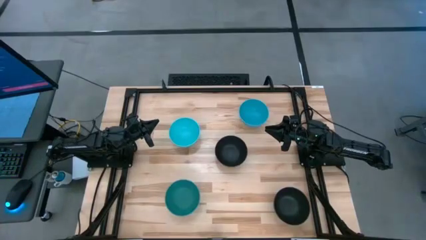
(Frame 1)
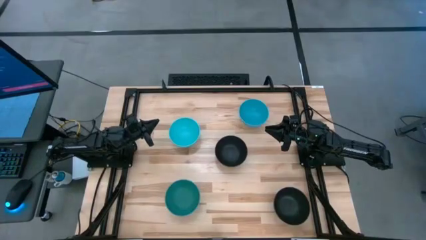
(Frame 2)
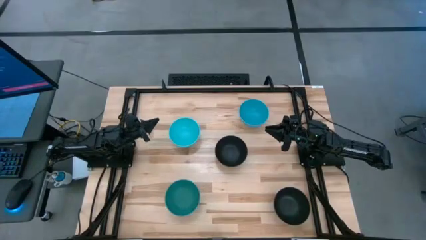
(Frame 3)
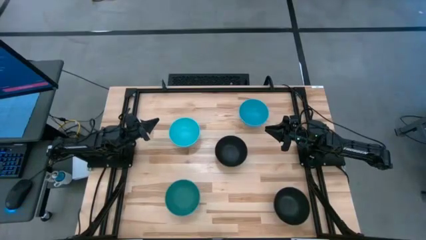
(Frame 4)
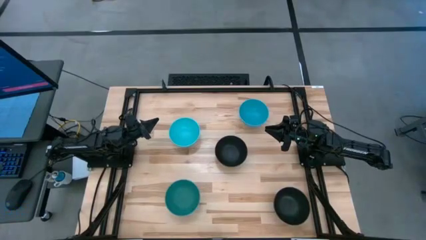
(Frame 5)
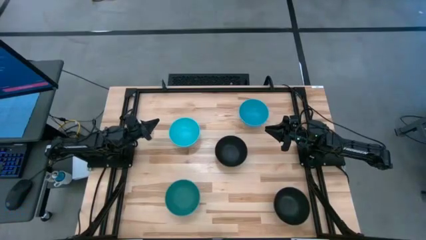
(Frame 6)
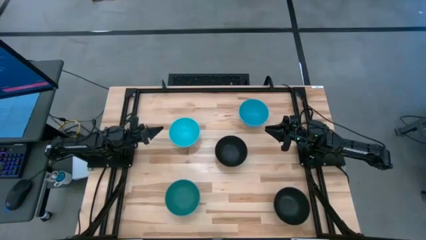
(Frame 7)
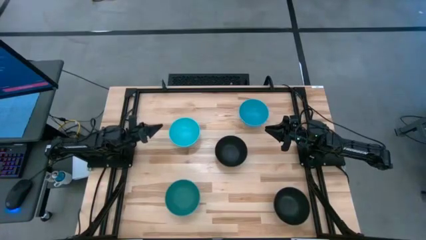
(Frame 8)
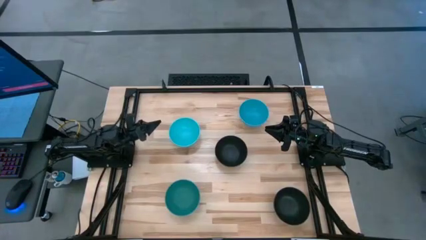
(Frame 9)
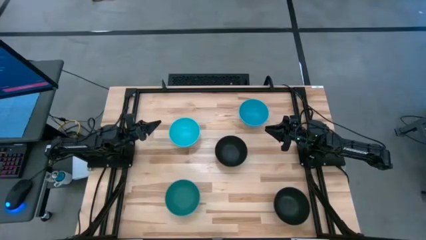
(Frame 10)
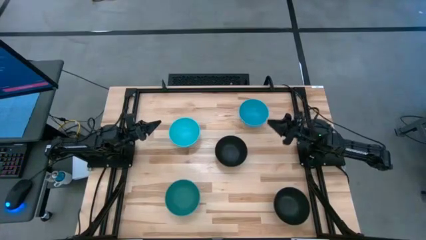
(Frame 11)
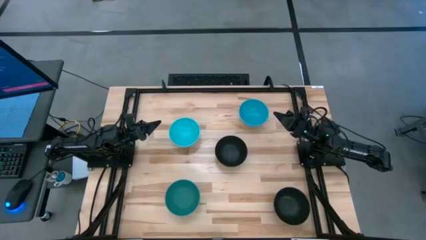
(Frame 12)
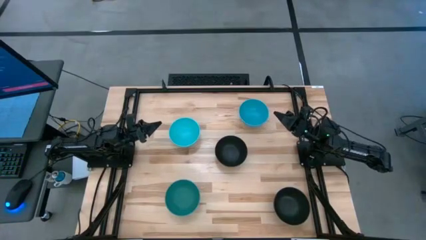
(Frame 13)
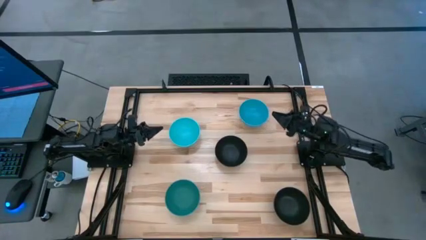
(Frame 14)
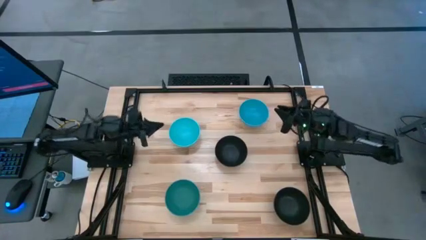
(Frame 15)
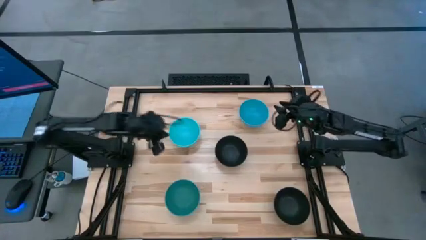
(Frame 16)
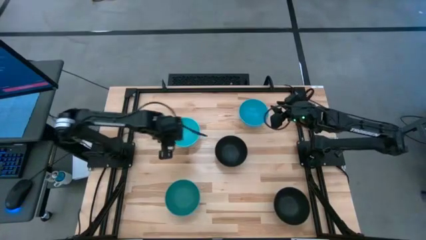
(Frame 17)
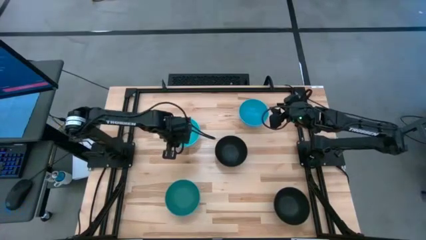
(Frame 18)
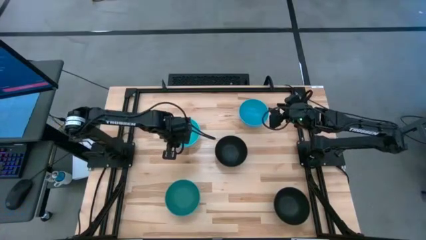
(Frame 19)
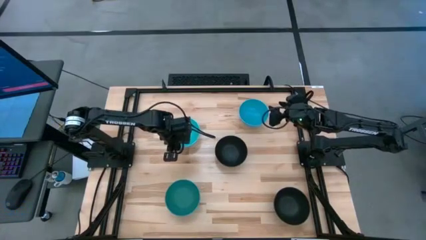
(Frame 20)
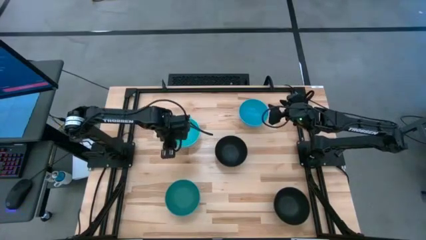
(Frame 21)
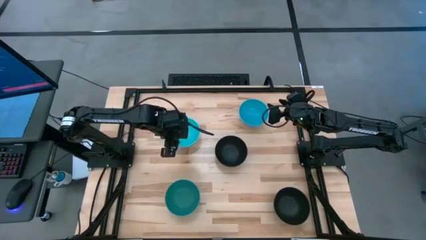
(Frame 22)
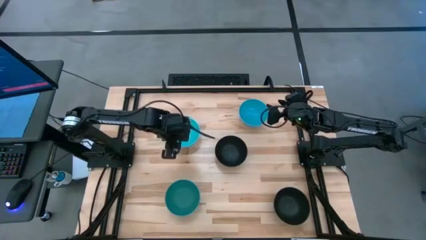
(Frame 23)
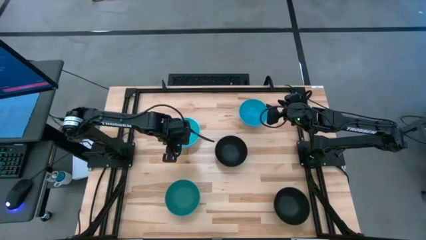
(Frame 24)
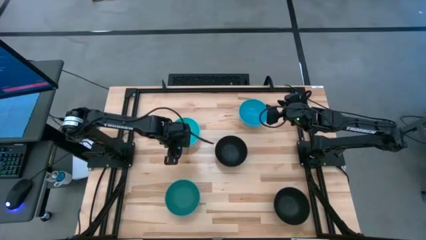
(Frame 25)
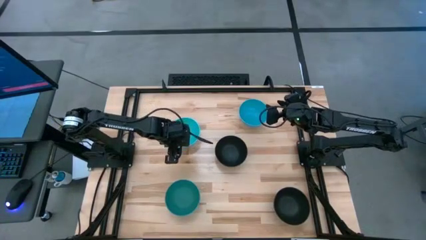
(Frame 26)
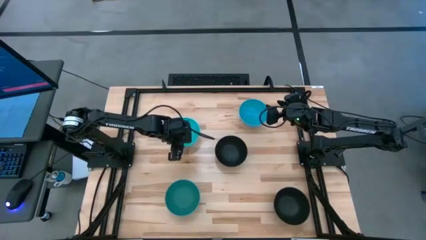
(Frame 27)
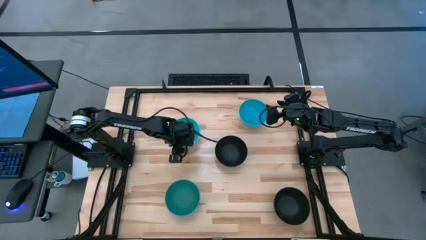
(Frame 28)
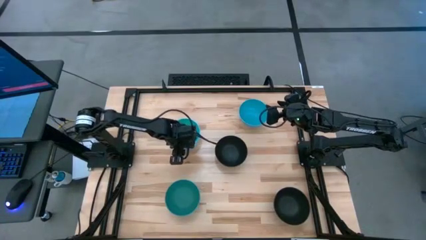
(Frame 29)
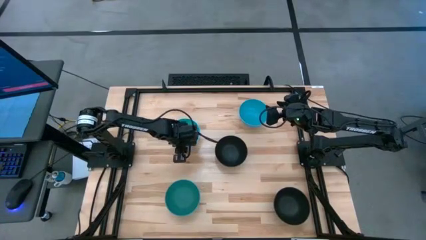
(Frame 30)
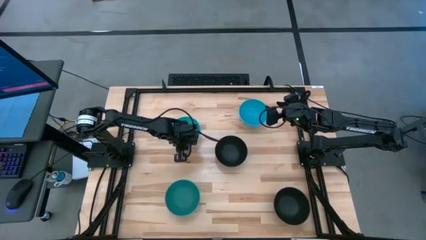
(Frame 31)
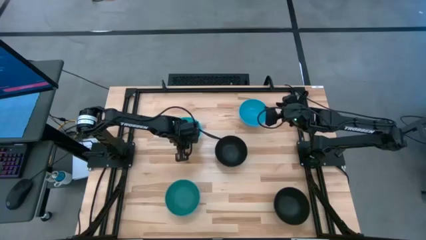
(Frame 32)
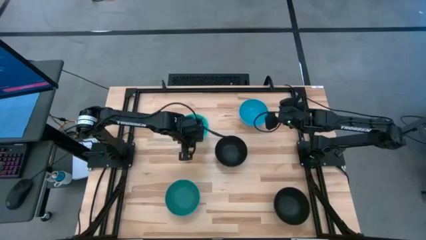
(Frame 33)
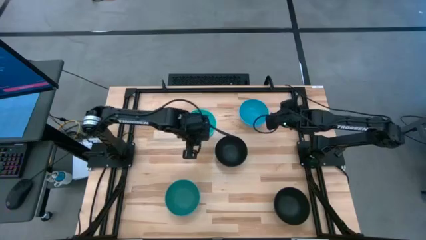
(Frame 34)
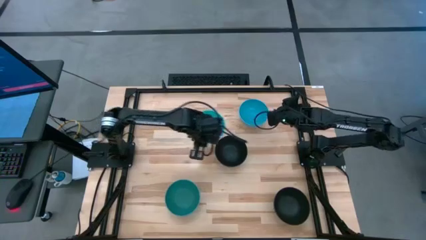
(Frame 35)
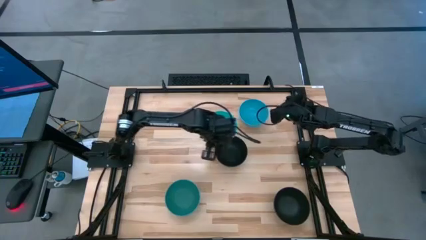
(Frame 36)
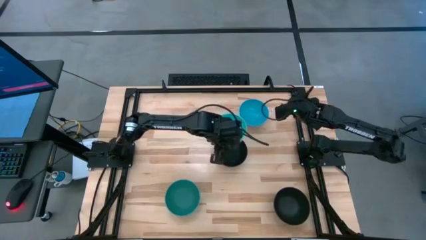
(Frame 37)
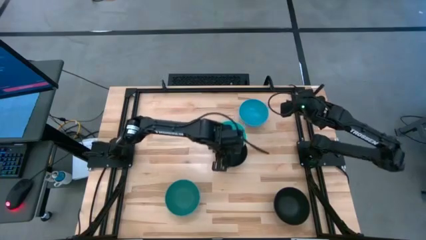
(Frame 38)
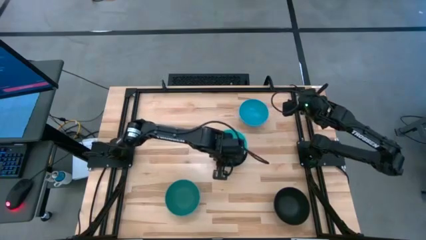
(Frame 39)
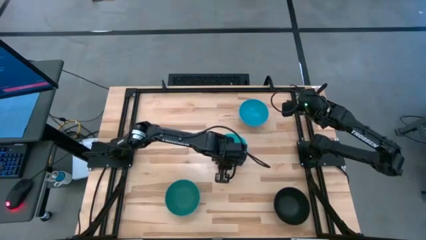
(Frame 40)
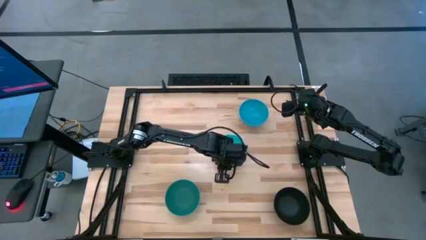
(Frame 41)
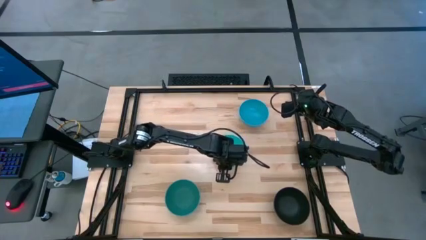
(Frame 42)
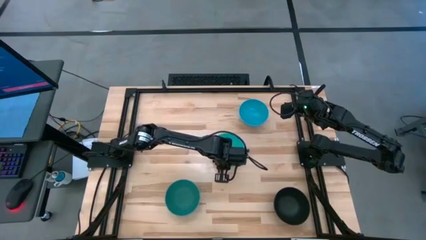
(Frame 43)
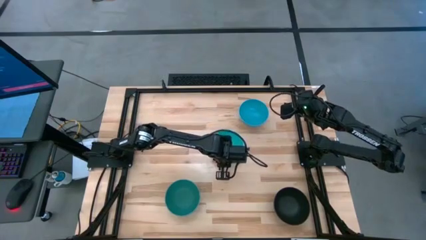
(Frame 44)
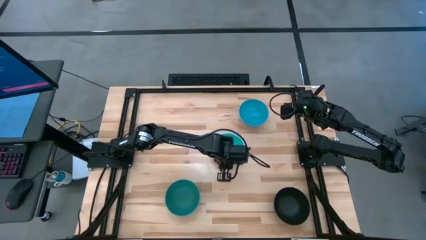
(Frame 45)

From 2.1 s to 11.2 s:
Task: Nest bowls inside each other
Stack the light blue bowl on top of the top black bowl

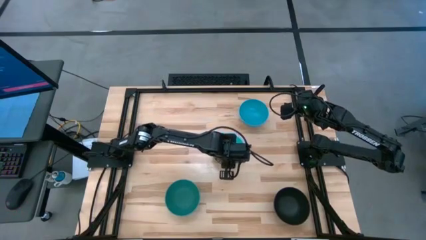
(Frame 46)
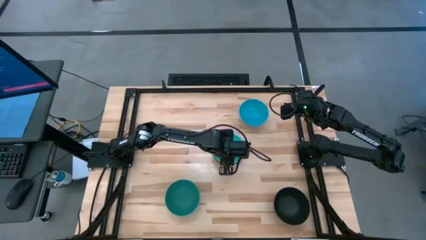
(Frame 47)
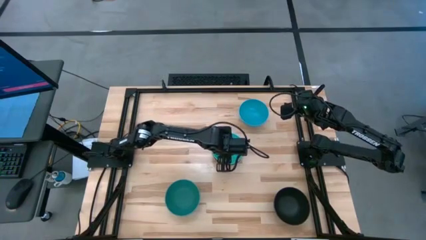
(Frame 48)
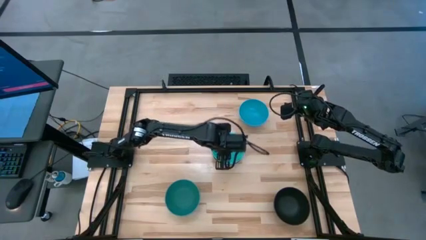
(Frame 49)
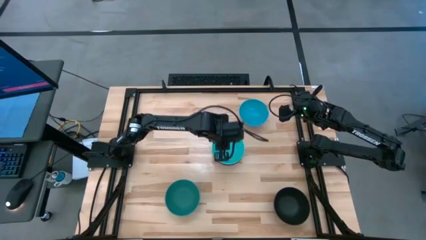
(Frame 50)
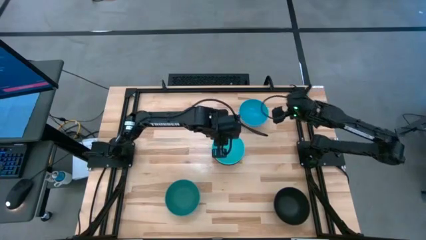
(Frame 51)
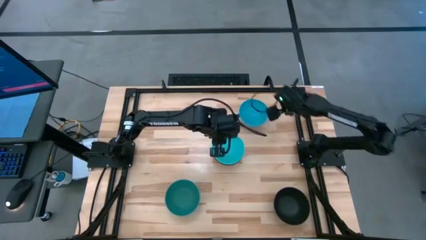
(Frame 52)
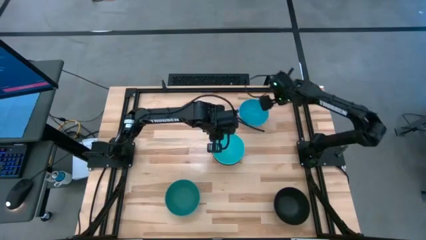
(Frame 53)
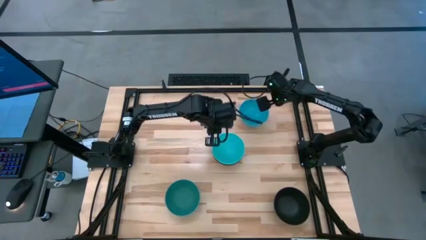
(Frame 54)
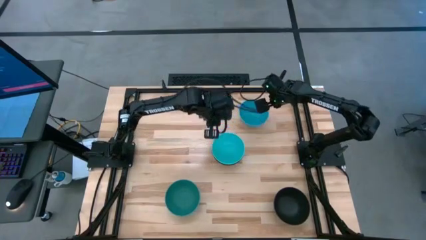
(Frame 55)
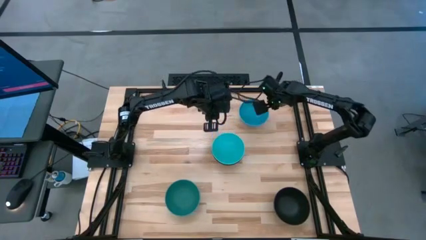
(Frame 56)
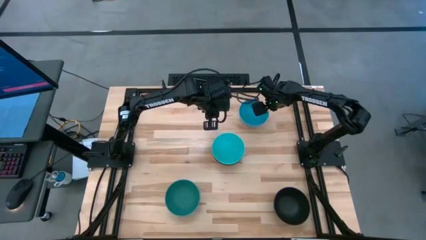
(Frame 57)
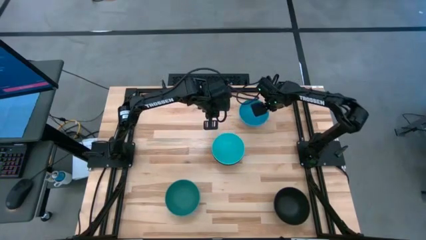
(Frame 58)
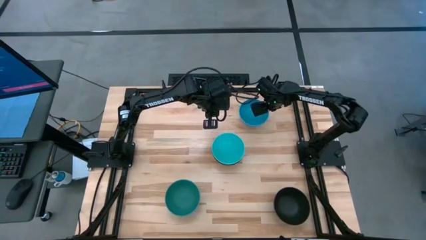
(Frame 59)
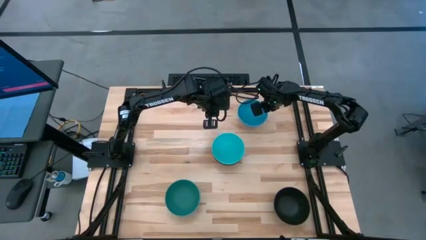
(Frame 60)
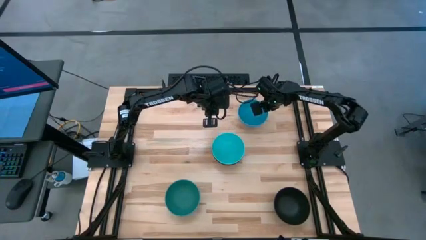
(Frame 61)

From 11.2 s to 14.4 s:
Stack the blue bowl on top of the blue bowl

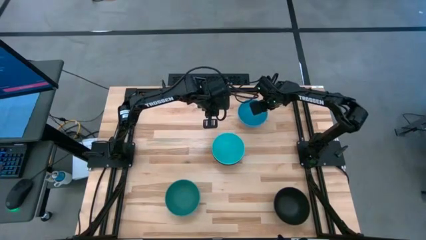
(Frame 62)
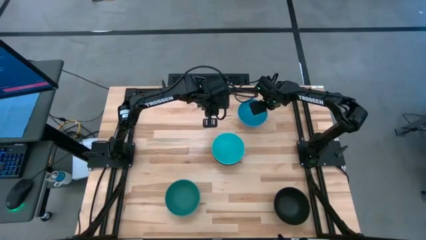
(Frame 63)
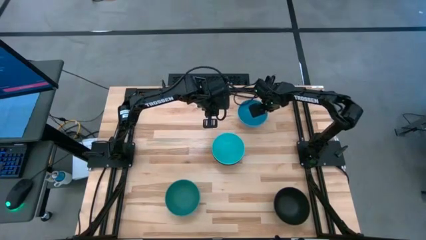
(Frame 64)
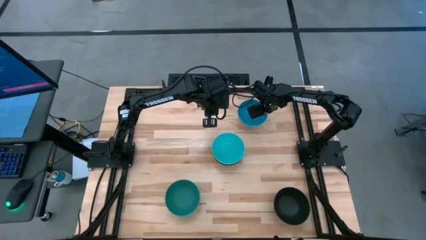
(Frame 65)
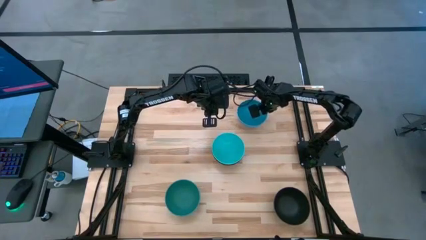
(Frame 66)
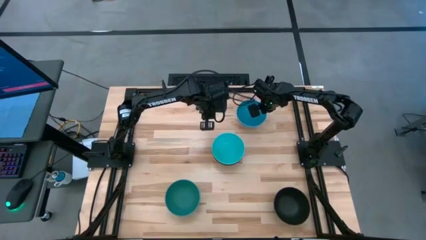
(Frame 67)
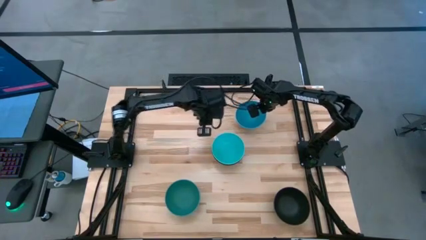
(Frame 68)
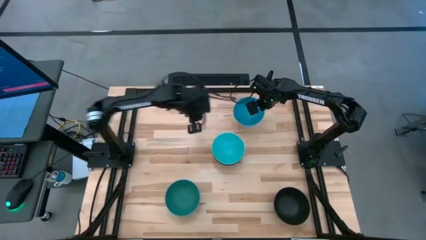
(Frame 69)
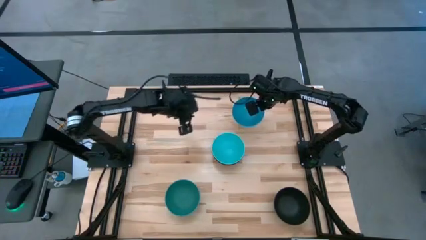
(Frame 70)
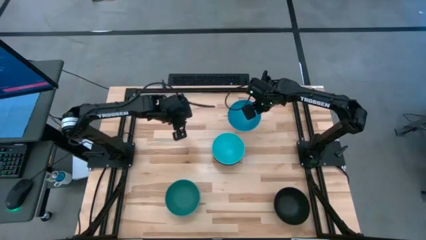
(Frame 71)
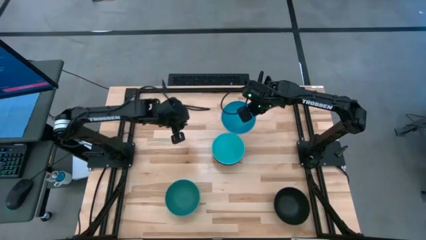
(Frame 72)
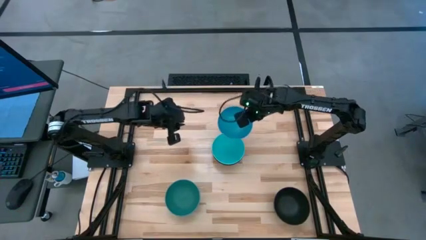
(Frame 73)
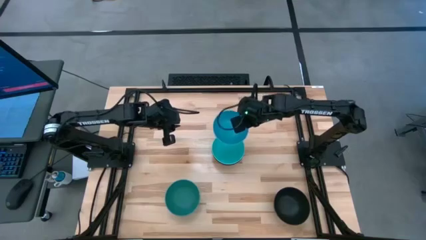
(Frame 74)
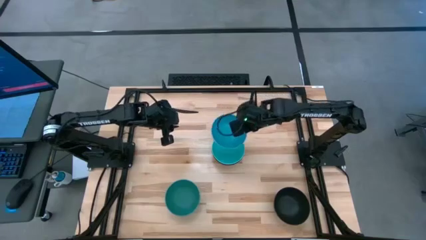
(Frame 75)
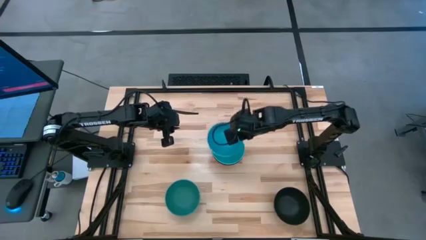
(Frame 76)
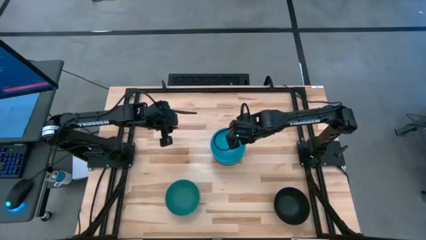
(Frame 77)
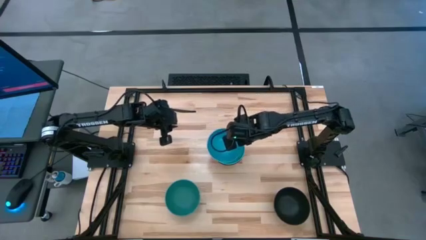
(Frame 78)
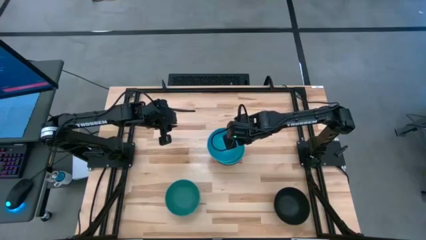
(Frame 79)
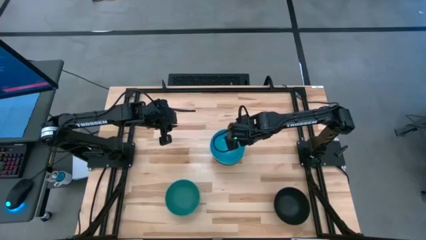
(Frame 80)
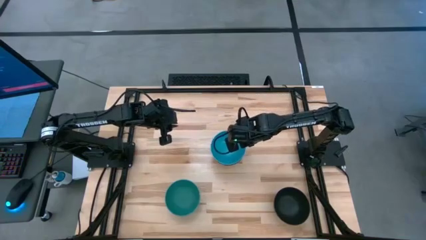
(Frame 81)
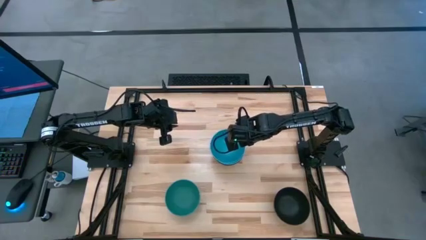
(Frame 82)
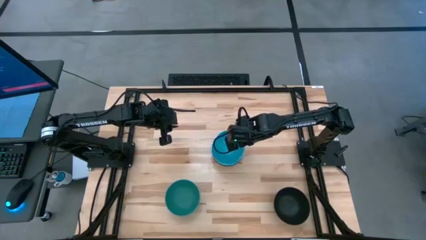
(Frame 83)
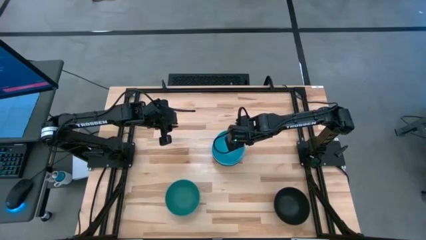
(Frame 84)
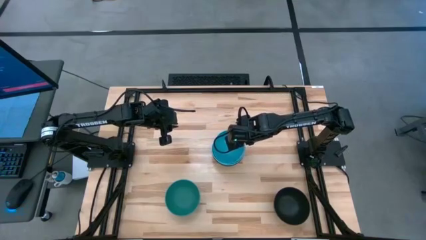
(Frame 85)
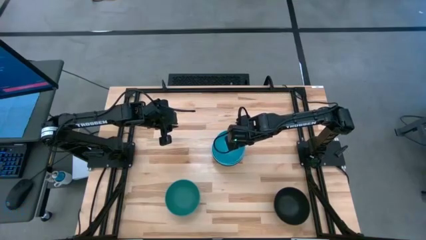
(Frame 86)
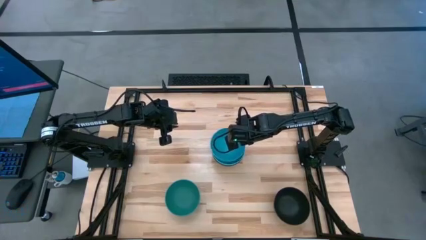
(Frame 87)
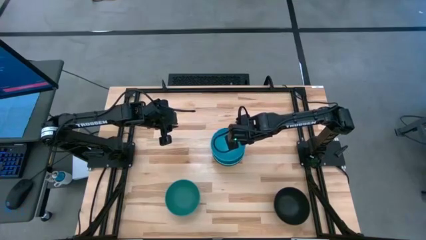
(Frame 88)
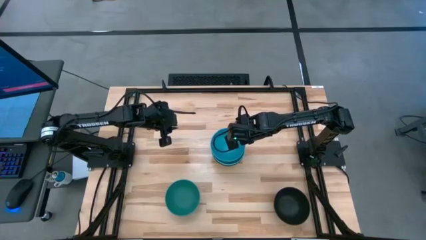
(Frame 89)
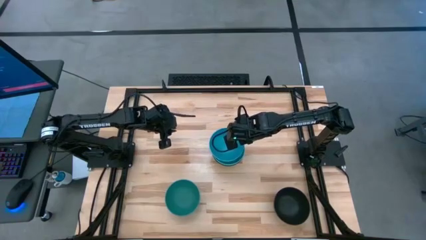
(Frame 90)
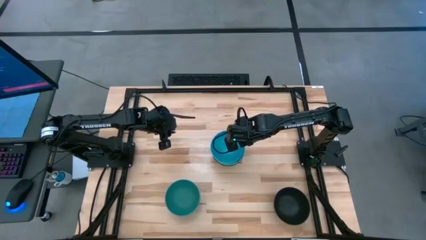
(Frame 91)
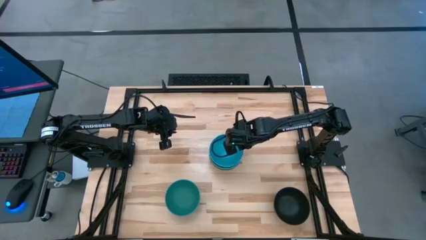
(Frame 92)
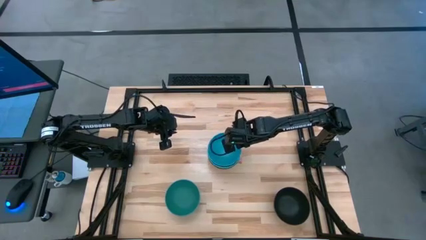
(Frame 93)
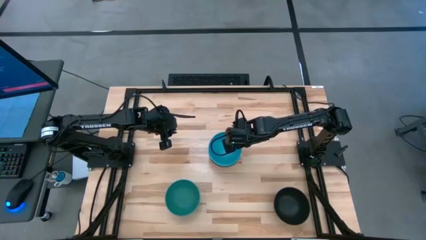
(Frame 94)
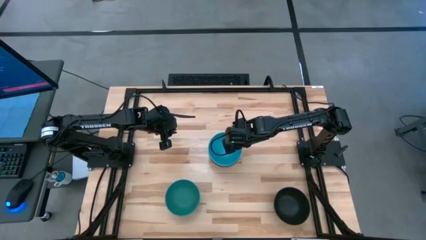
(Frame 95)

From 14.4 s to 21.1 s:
Stack the blue bowl on top of the blue bowl
